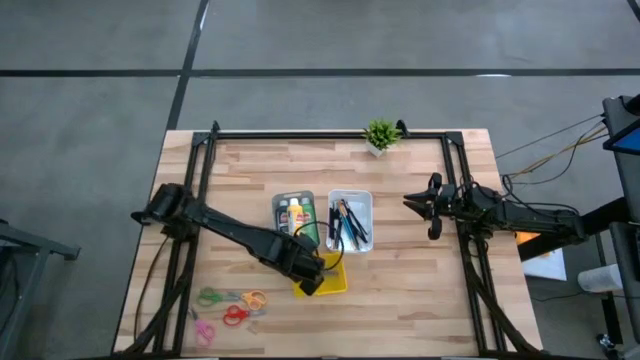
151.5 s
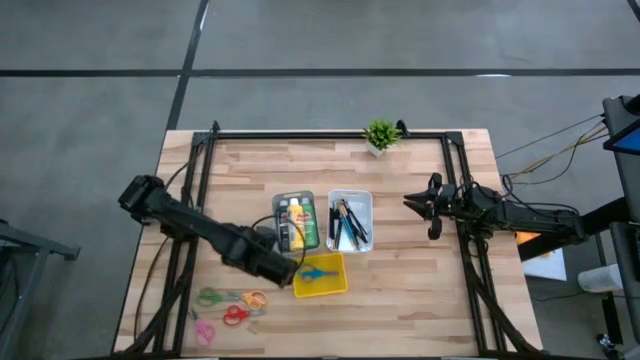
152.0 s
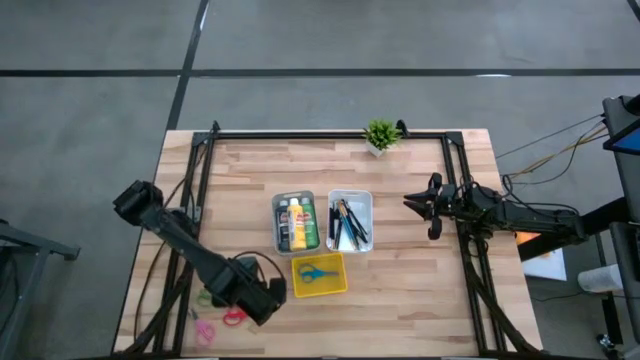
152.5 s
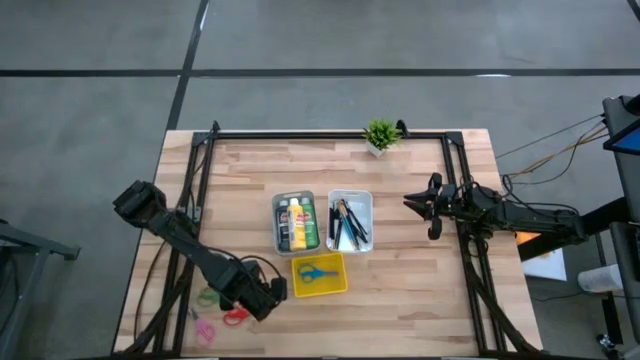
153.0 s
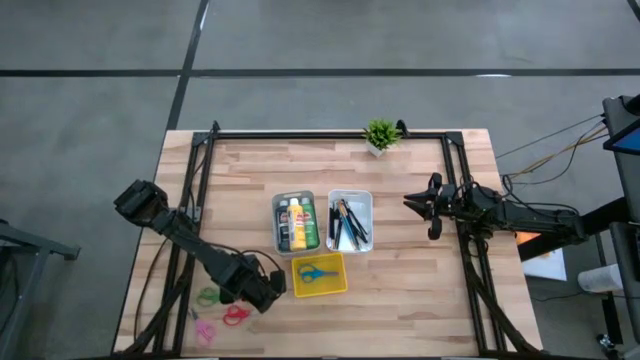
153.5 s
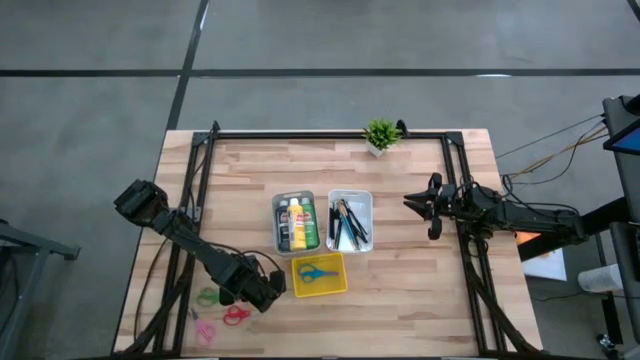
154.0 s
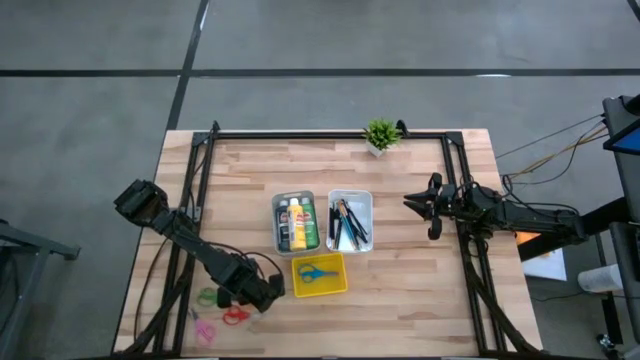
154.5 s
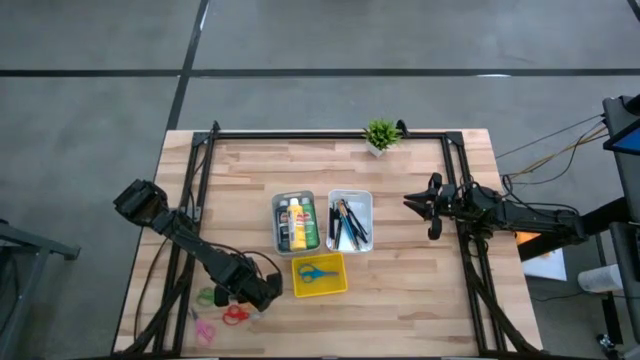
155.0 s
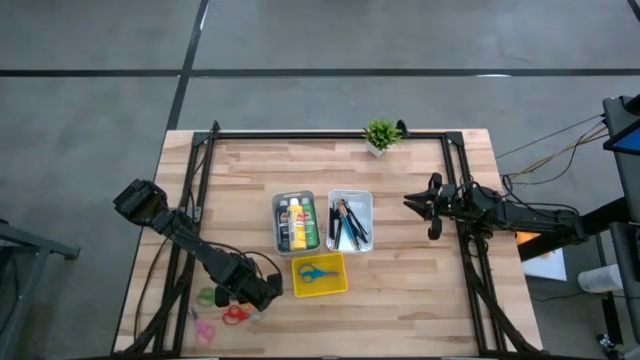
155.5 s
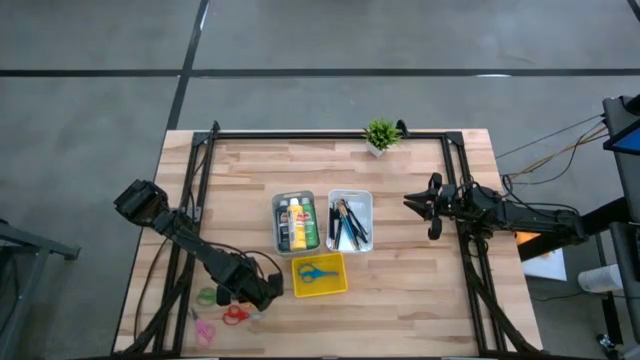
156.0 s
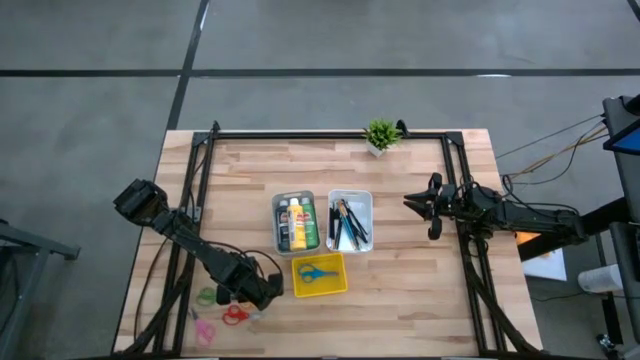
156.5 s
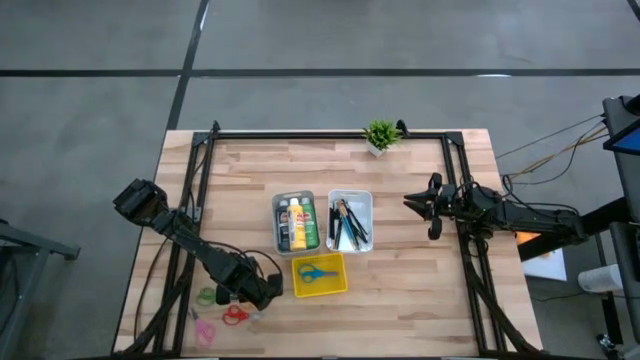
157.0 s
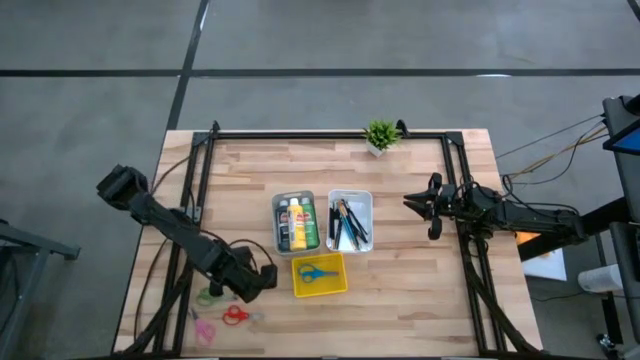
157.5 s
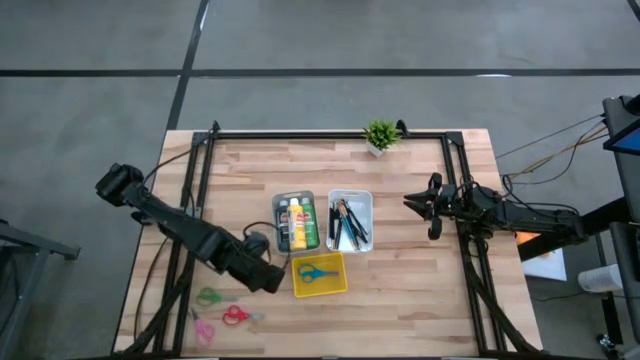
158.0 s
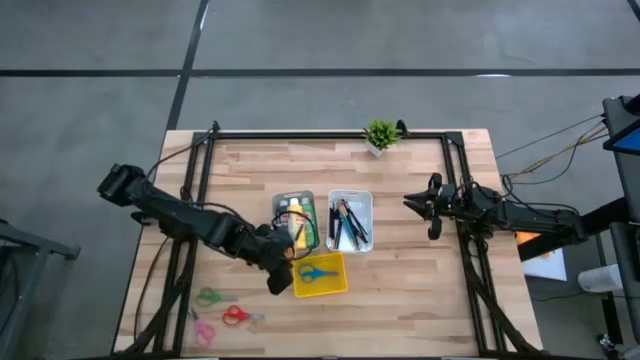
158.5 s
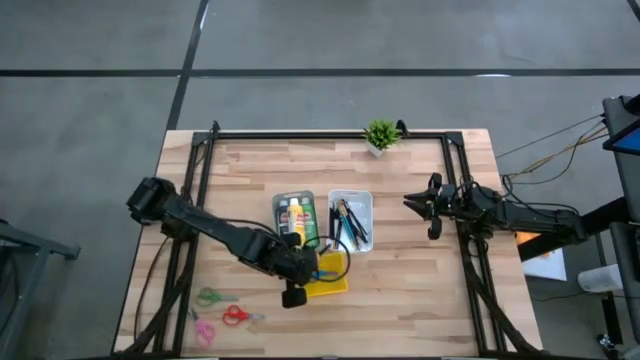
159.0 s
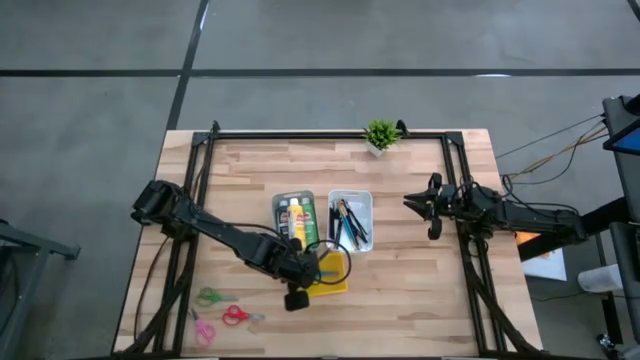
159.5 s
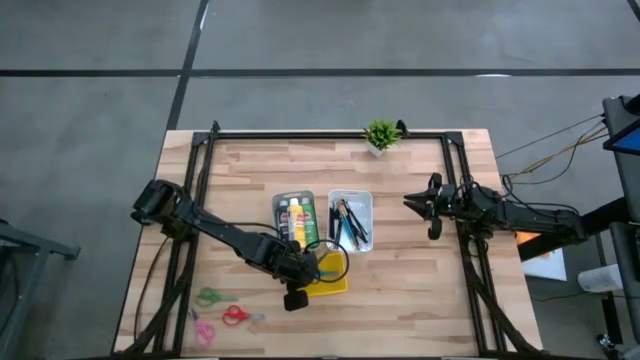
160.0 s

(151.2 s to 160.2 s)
Task: Pick & Place Paint Supplies
Put the yellow scissors into the yellow bin

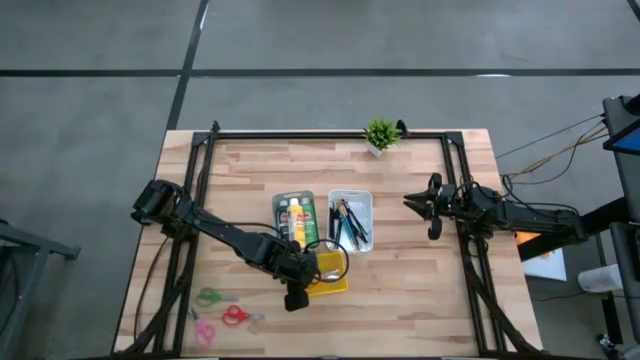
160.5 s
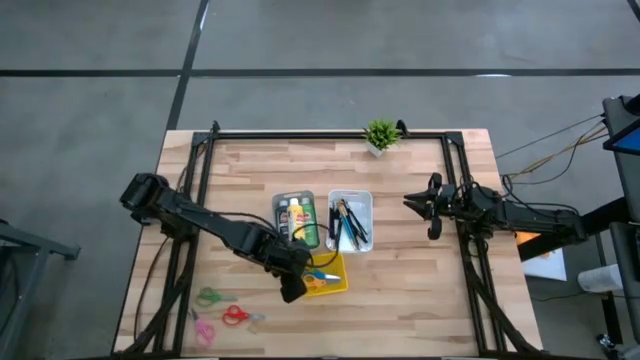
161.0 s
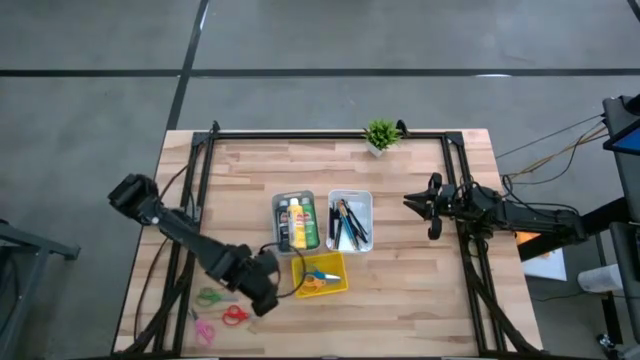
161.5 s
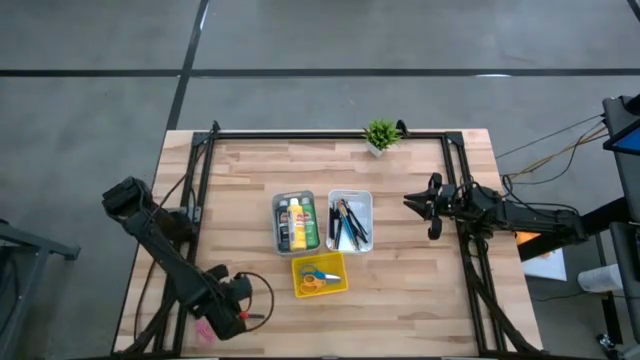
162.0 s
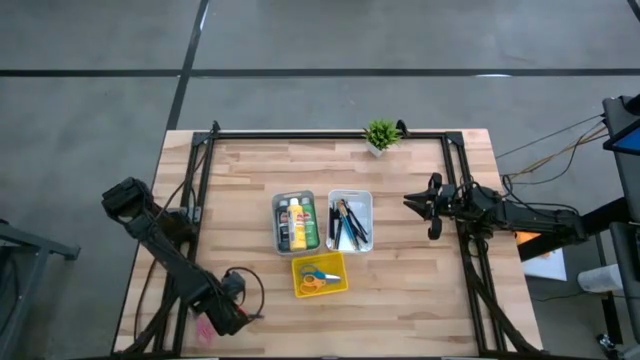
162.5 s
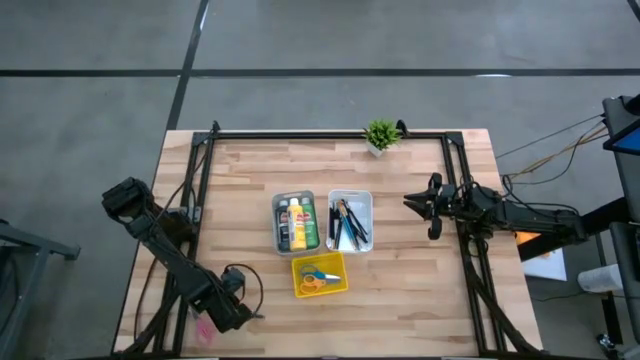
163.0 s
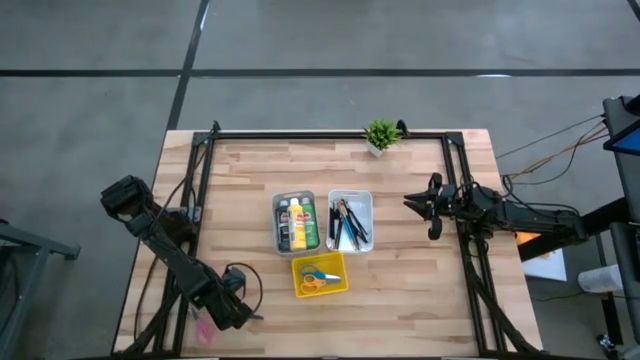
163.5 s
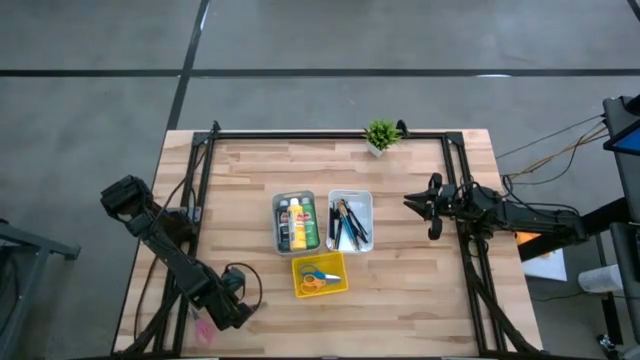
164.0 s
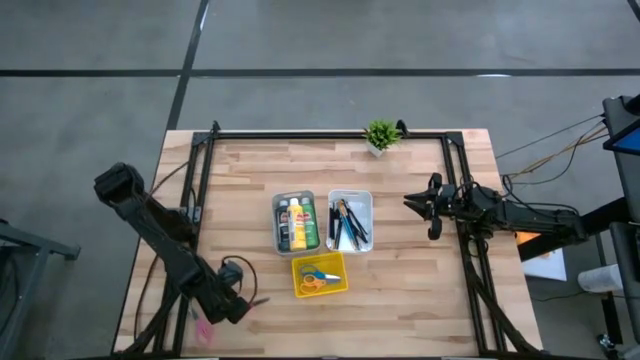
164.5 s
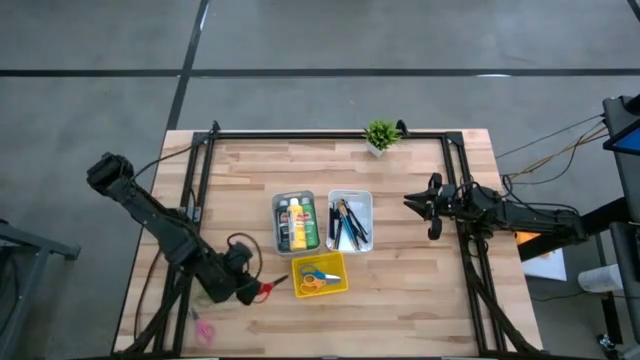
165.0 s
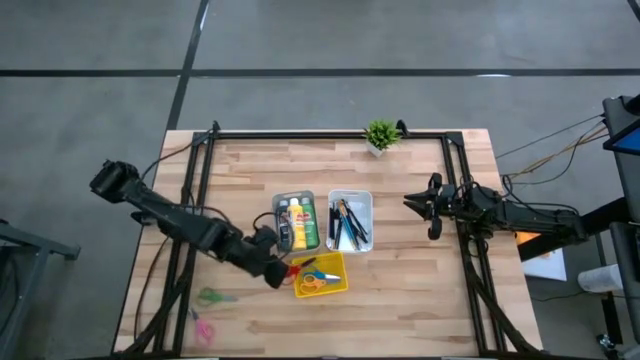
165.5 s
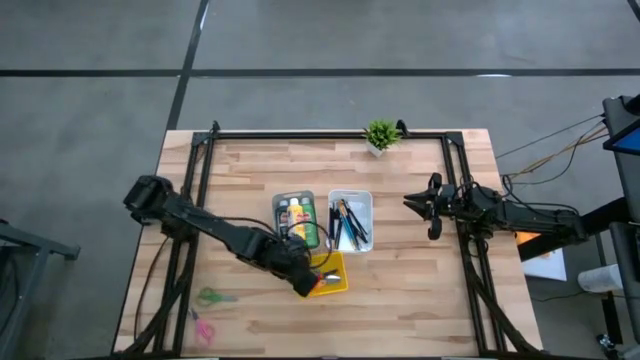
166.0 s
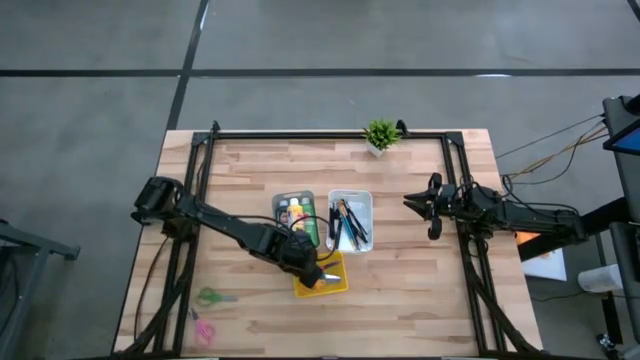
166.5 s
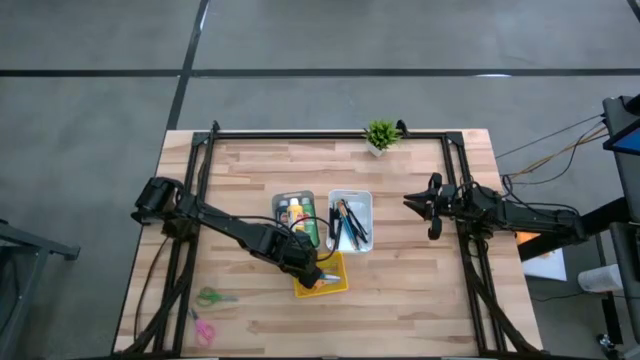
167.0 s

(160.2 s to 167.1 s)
Put the red scissors into the yellow bin

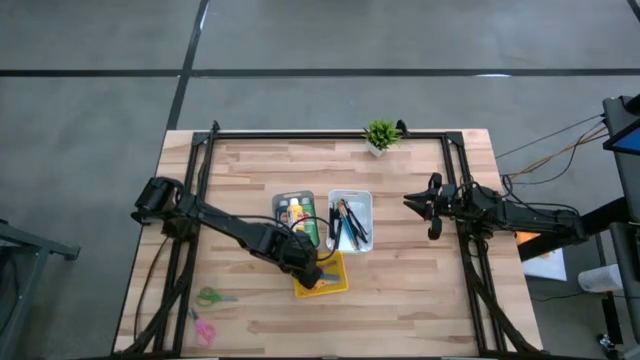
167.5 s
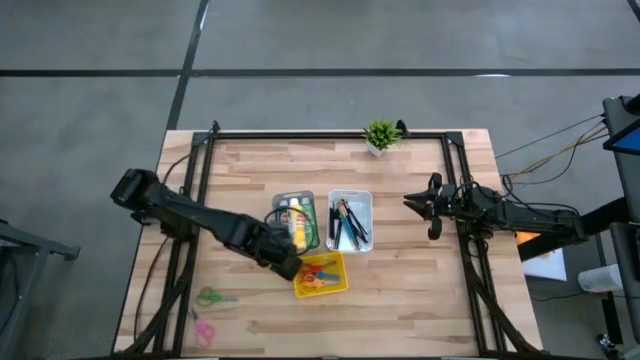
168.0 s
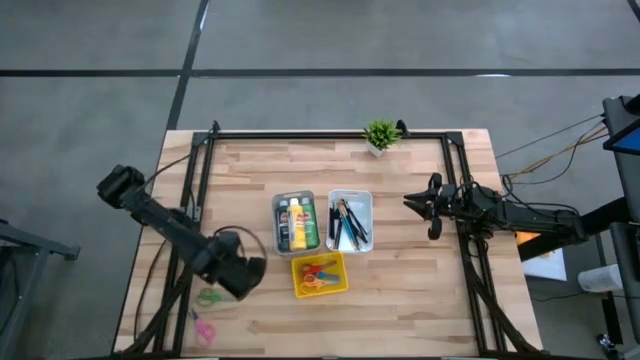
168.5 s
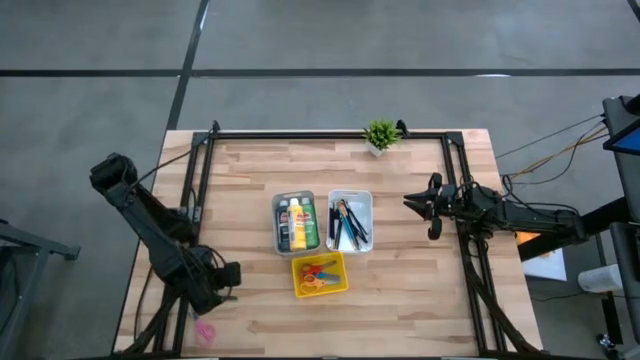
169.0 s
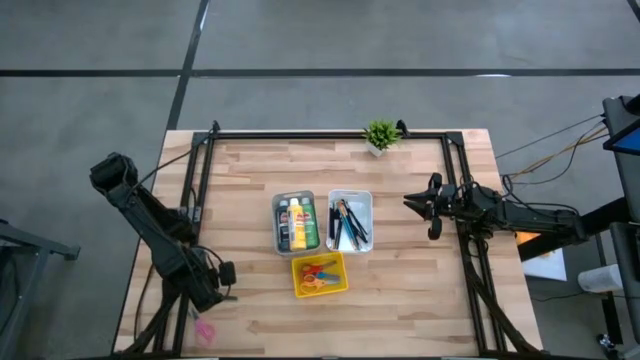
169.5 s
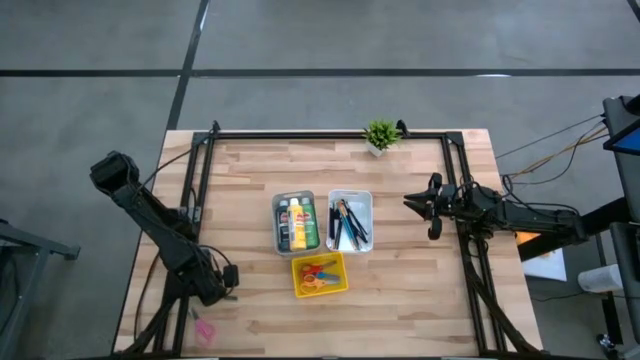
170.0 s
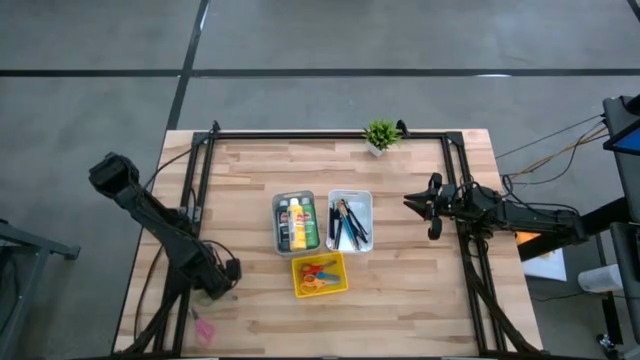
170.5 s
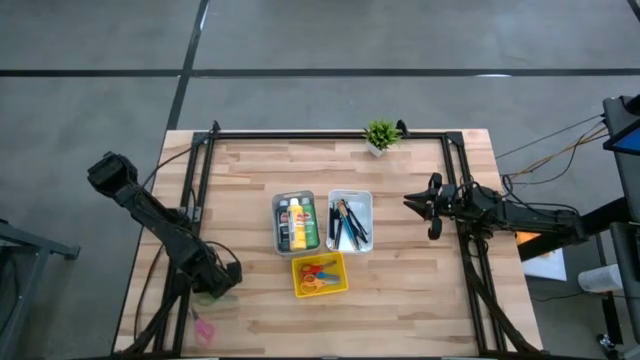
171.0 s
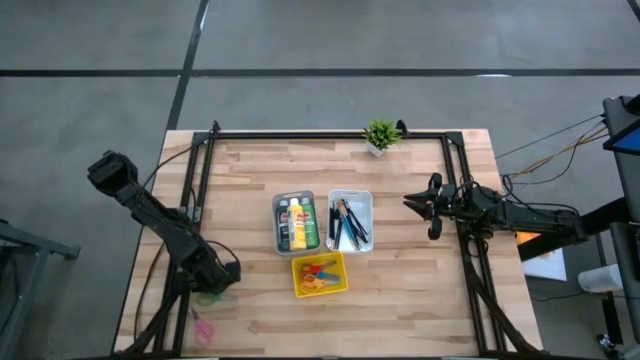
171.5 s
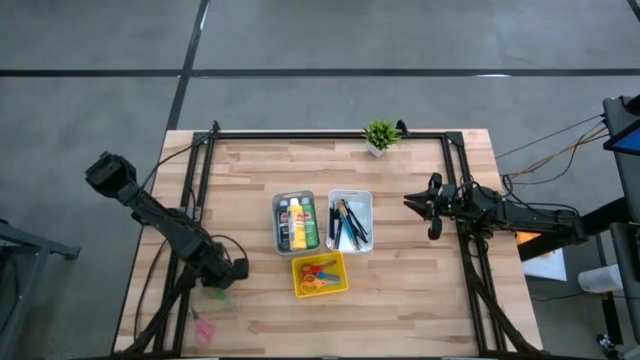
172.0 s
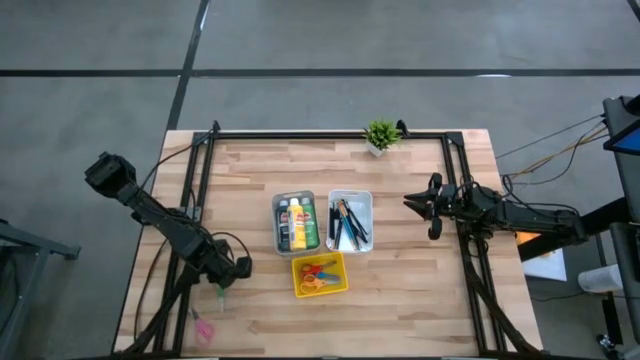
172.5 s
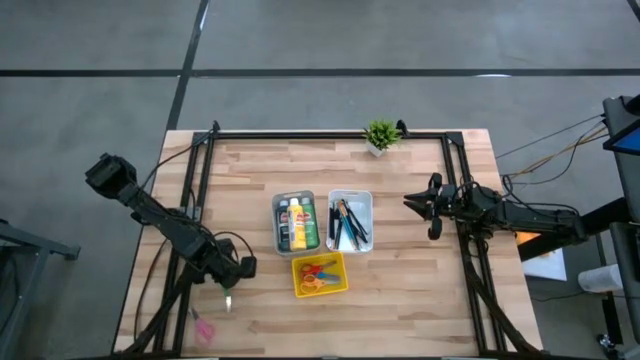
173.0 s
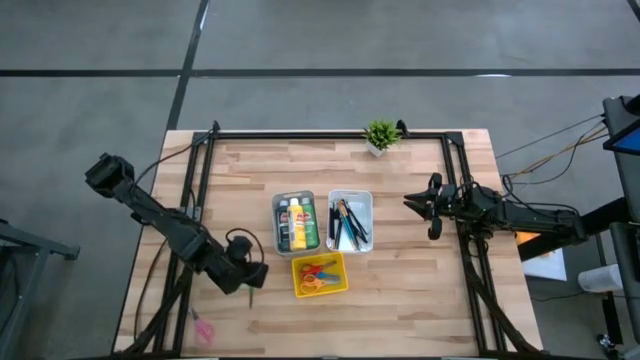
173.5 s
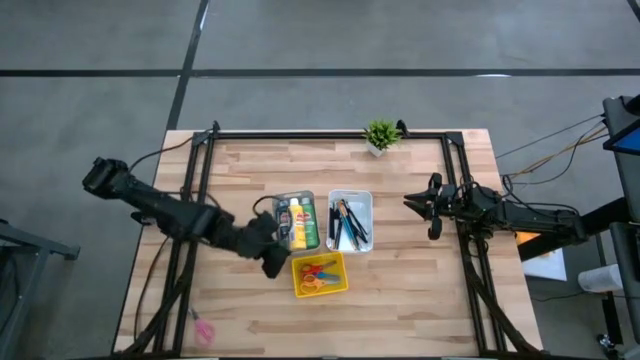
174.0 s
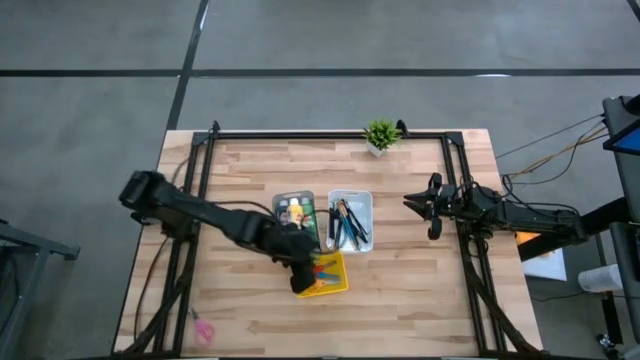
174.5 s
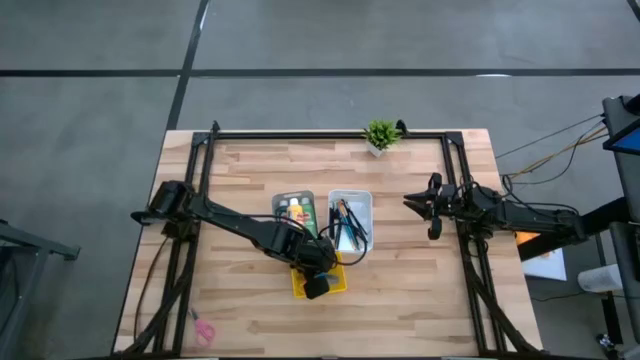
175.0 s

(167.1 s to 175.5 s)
Put the green scissors into the yellow bin
